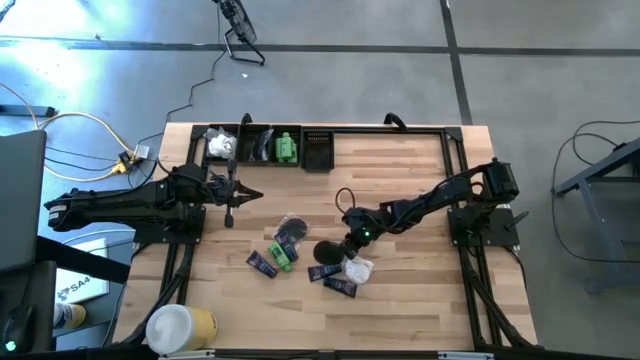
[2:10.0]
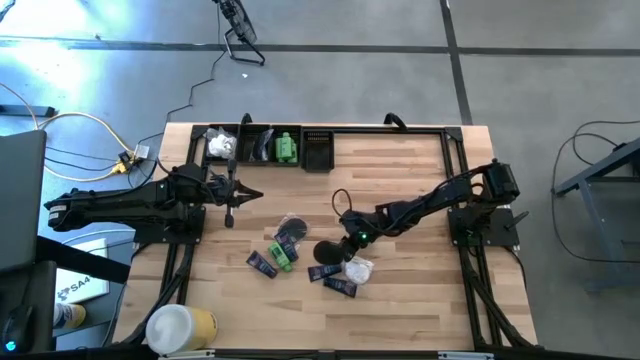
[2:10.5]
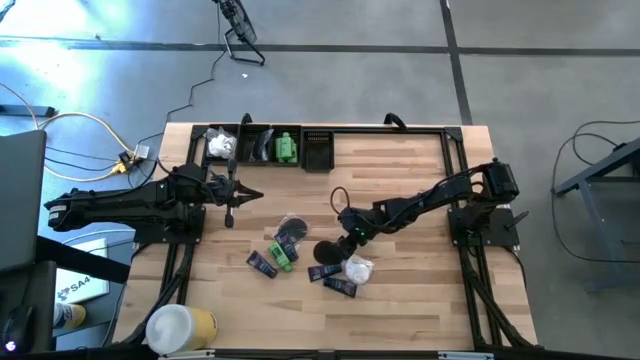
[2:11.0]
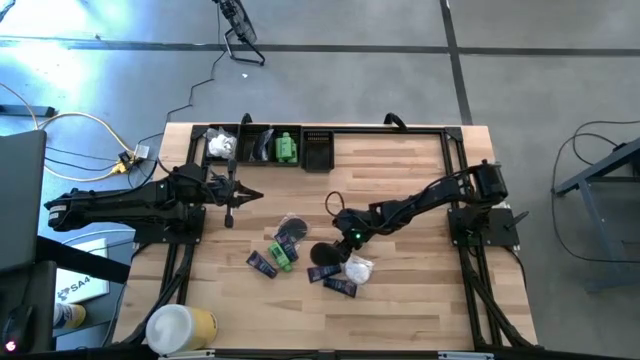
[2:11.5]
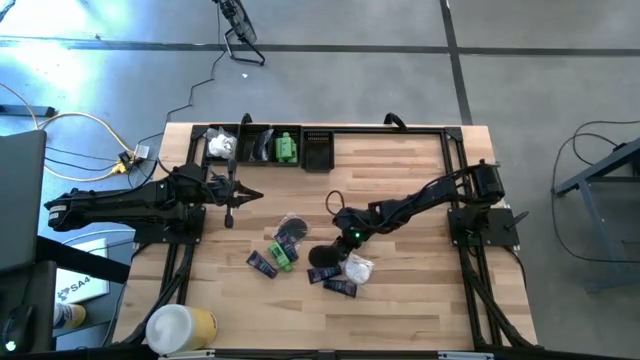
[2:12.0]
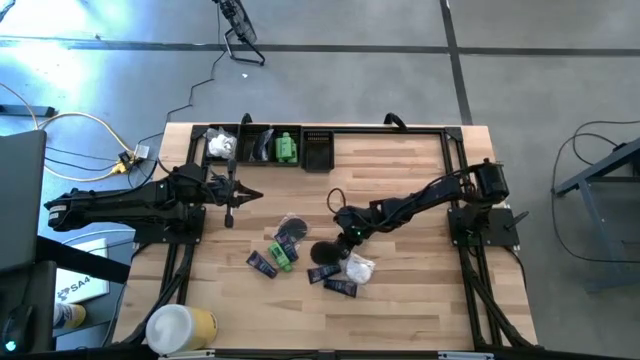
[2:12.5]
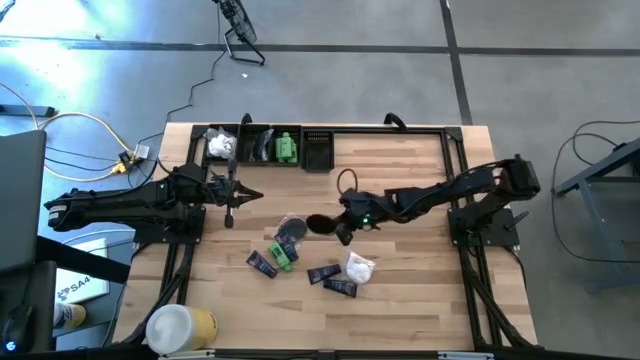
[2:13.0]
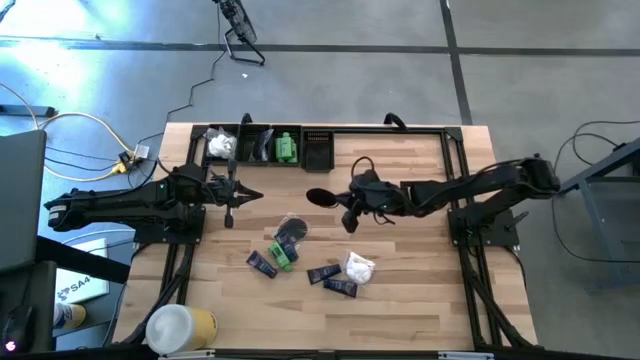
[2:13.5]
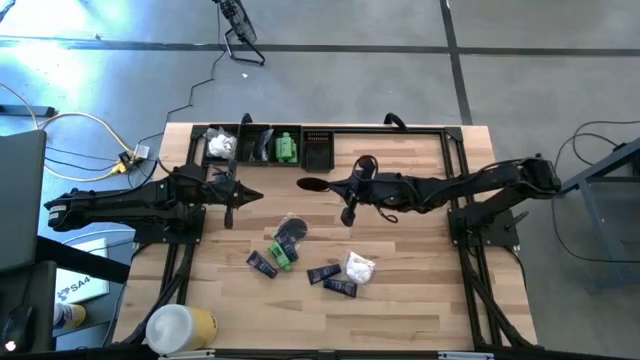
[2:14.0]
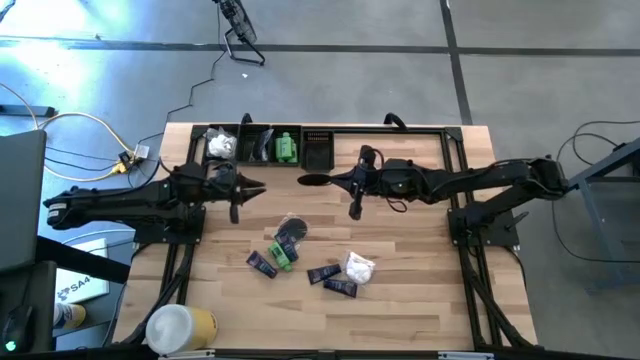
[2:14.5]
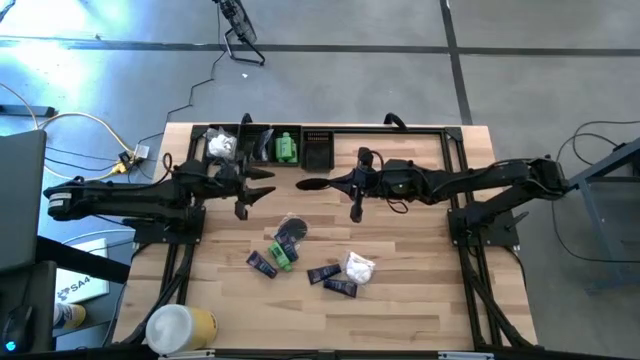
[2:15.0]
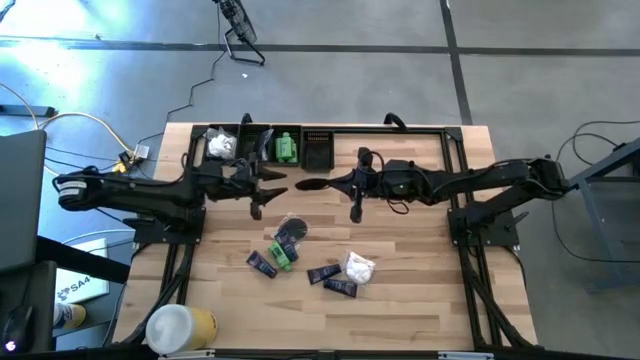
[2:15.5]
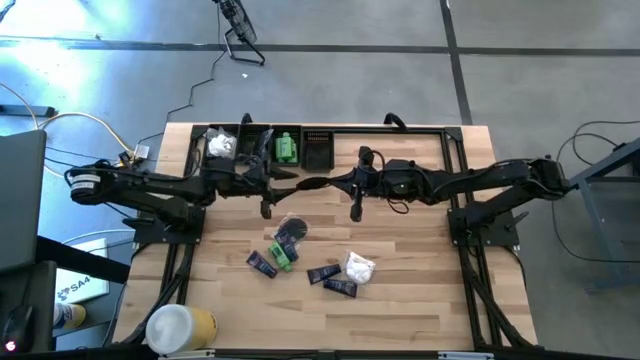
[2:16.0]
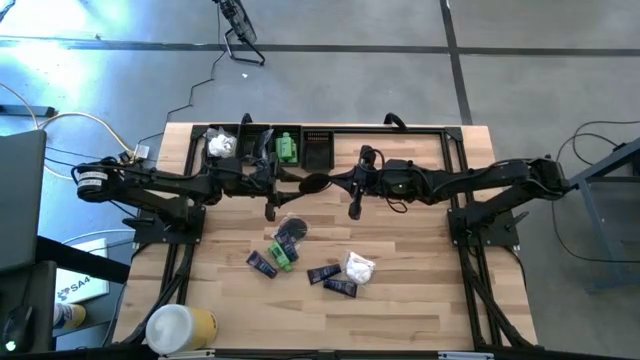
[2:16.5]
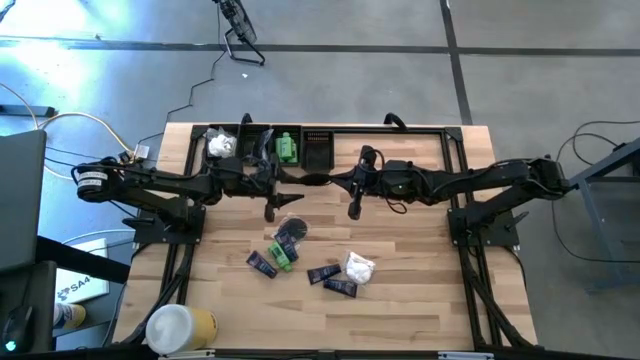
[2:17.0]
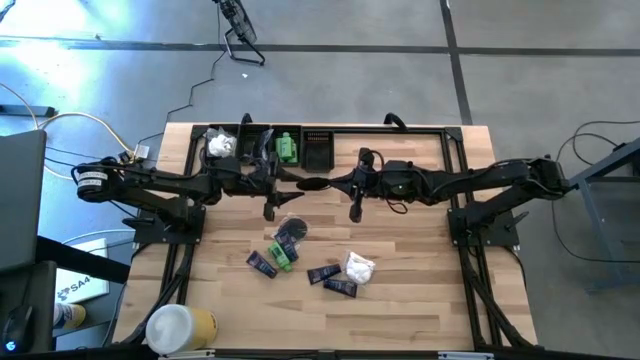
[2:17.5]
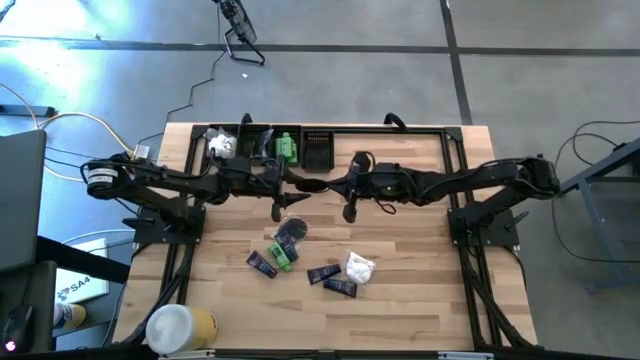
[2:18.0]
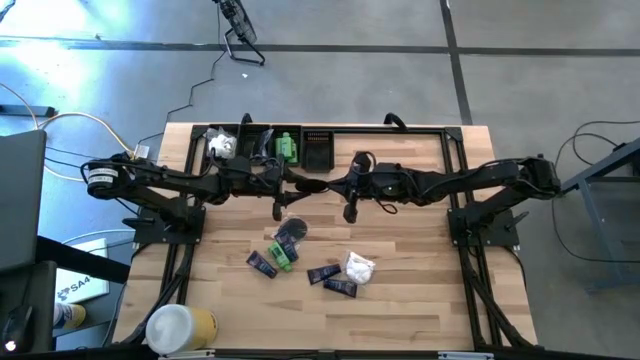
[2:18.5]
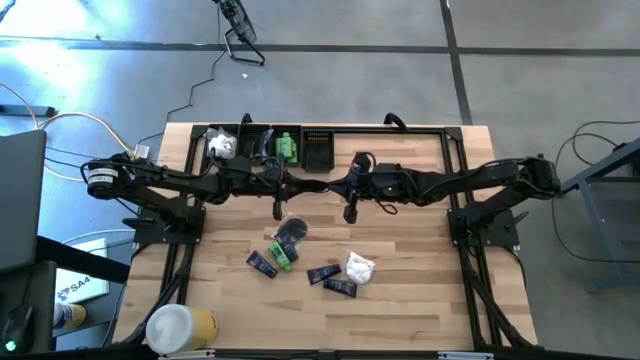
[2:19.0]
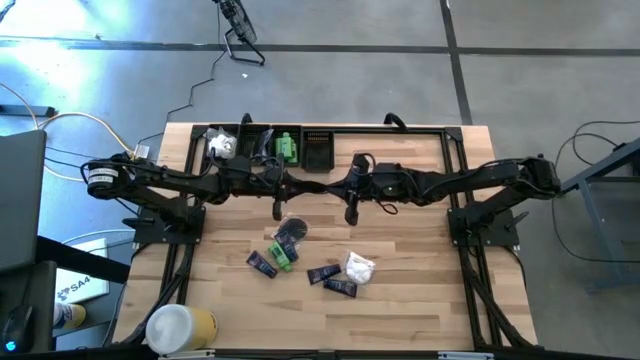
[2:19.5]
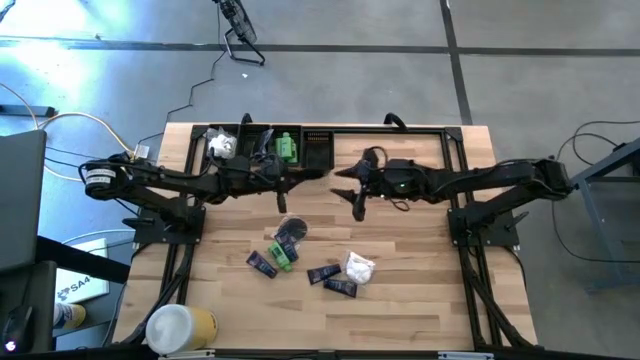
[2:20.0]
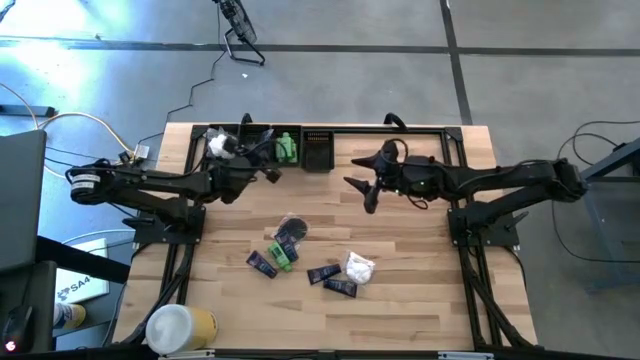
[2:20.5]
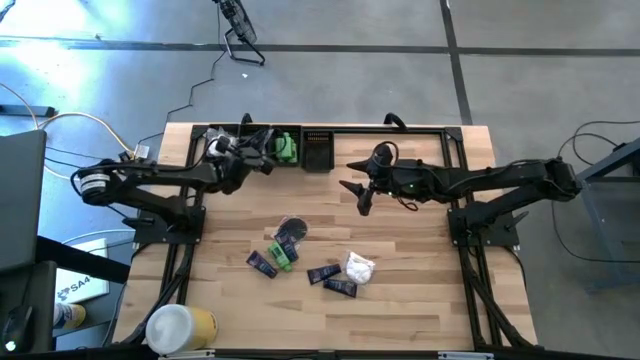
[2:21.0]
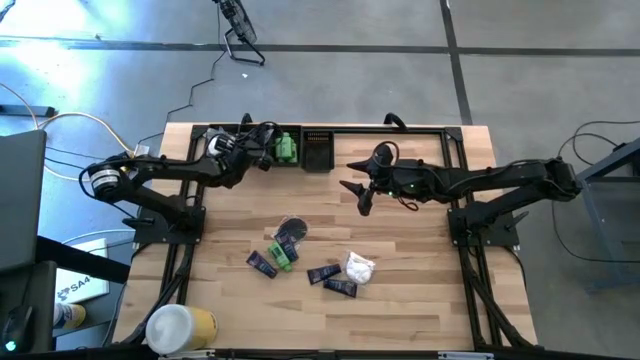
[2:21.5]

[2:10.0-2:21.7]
Task: Pick & Place Travel size toiletries
Put the hairbrush into the middle left black bin

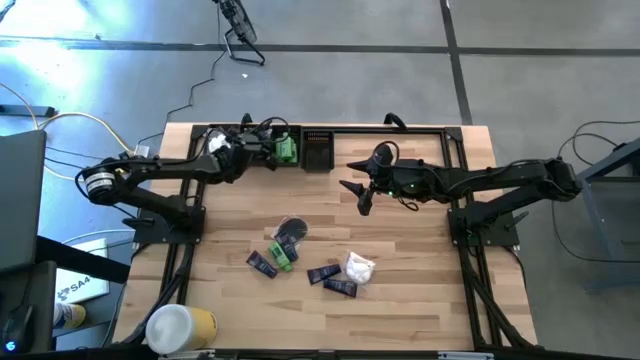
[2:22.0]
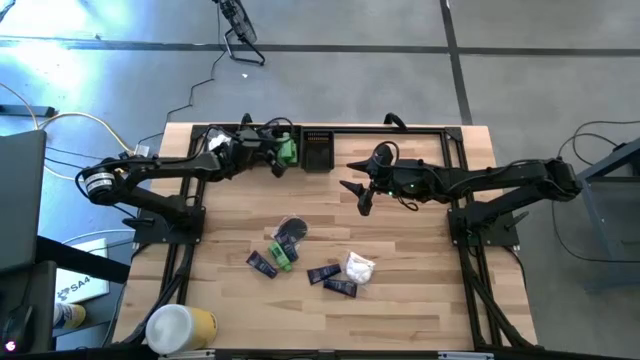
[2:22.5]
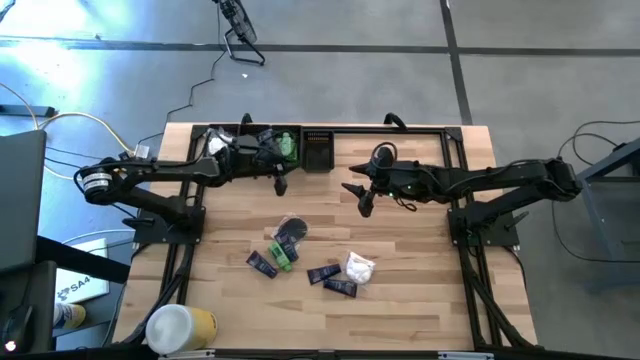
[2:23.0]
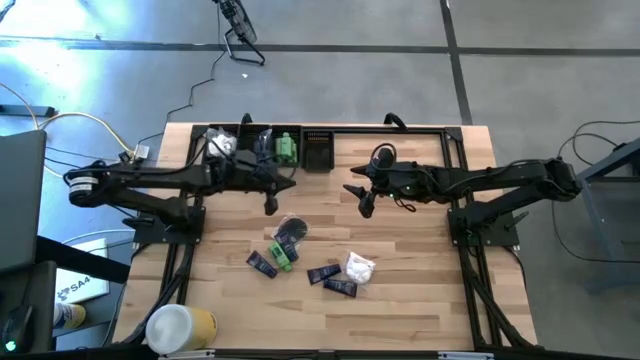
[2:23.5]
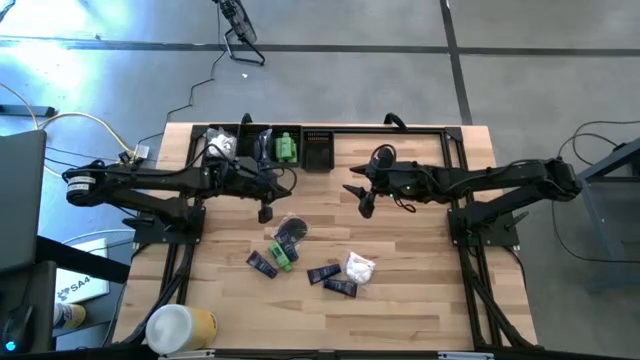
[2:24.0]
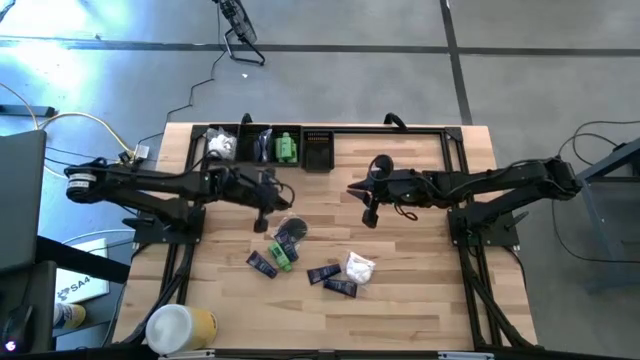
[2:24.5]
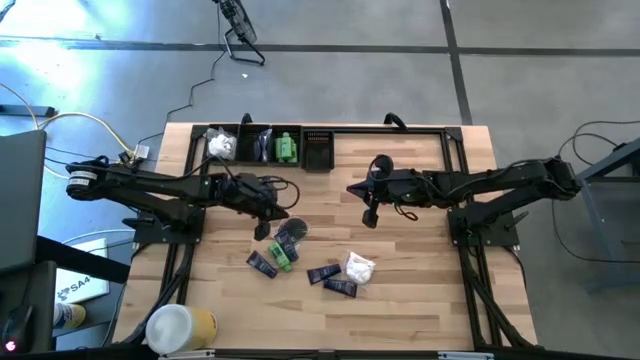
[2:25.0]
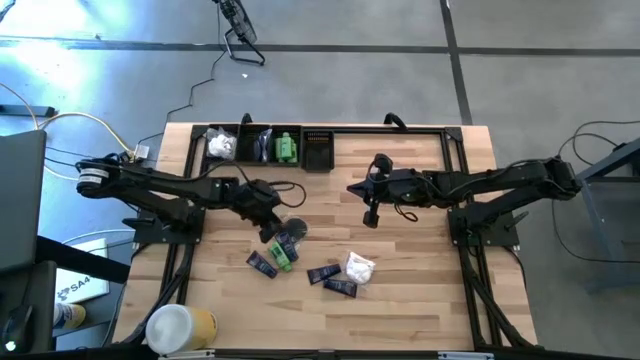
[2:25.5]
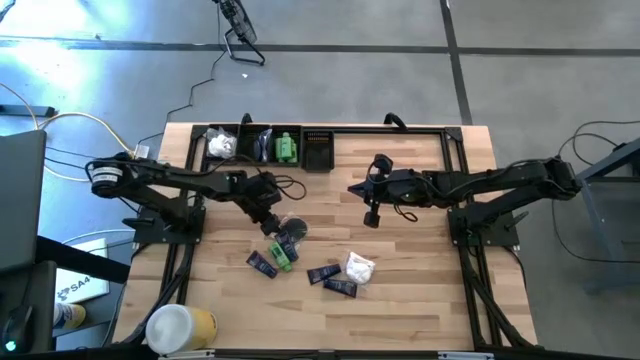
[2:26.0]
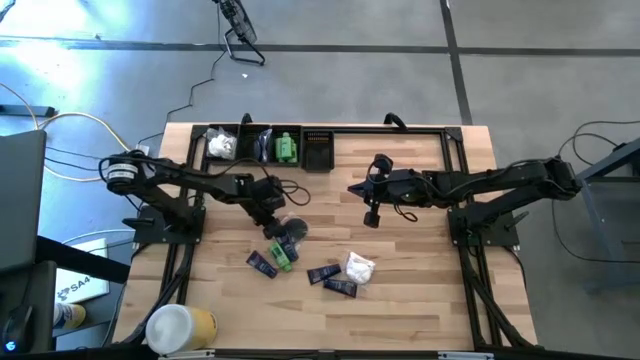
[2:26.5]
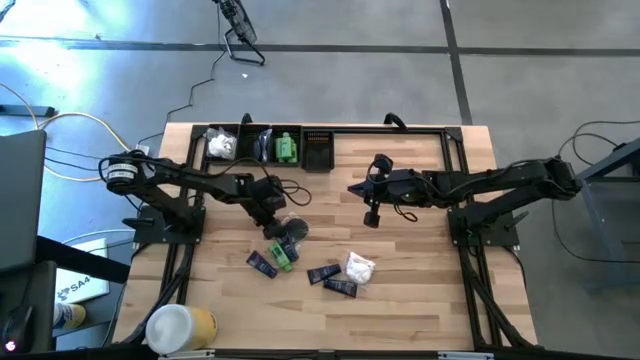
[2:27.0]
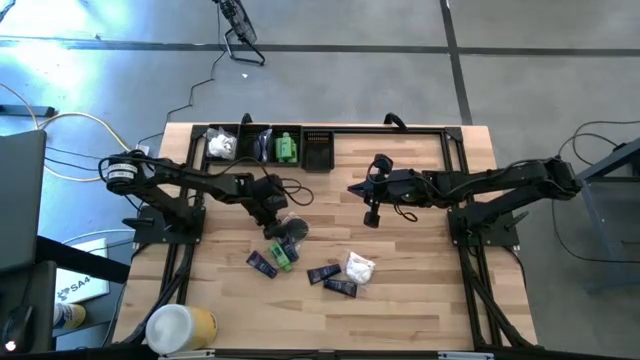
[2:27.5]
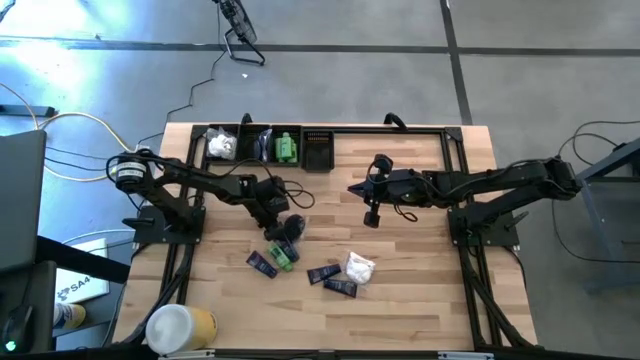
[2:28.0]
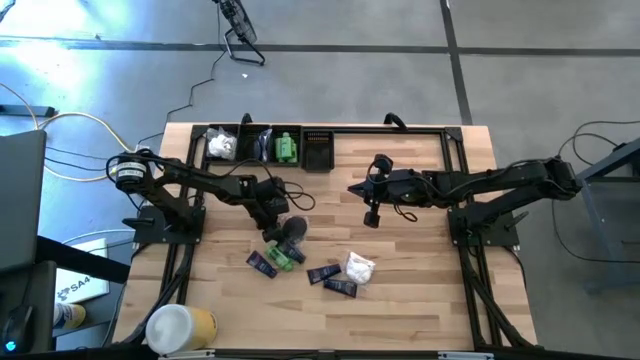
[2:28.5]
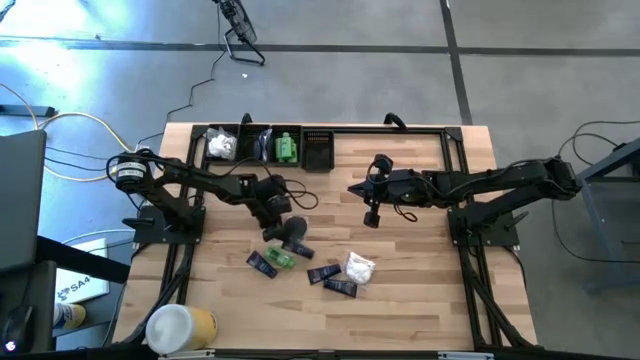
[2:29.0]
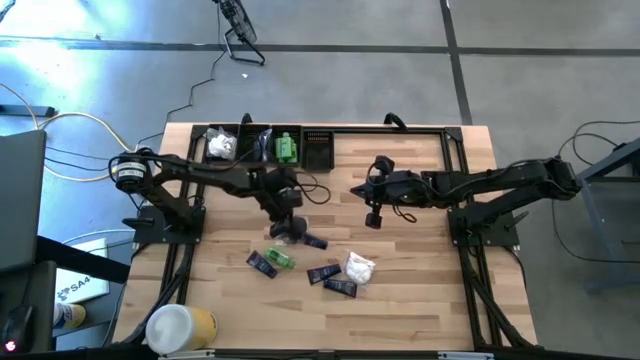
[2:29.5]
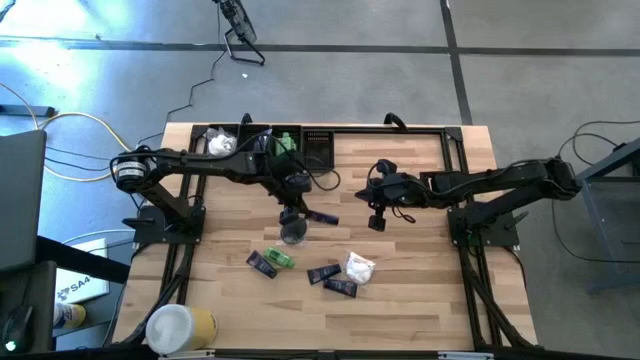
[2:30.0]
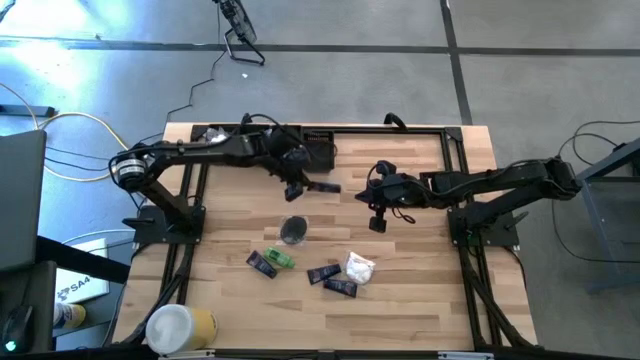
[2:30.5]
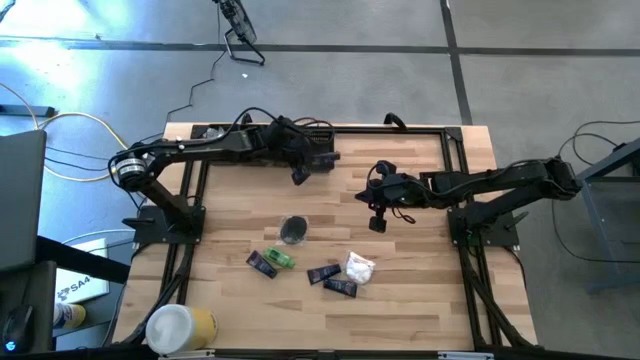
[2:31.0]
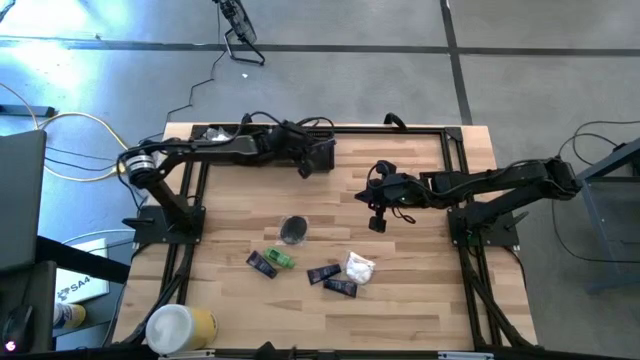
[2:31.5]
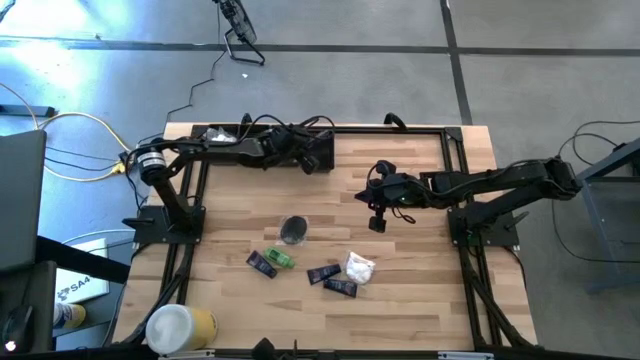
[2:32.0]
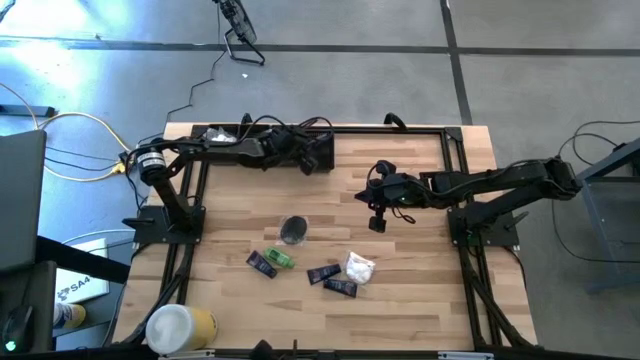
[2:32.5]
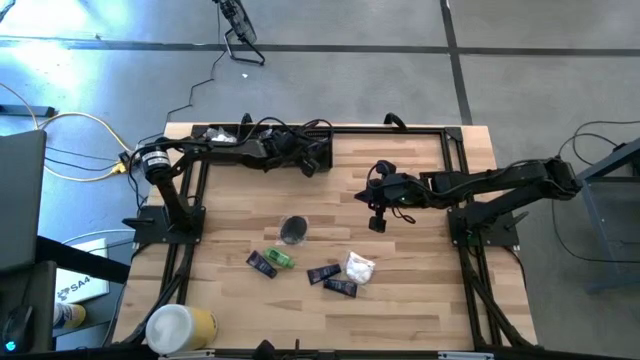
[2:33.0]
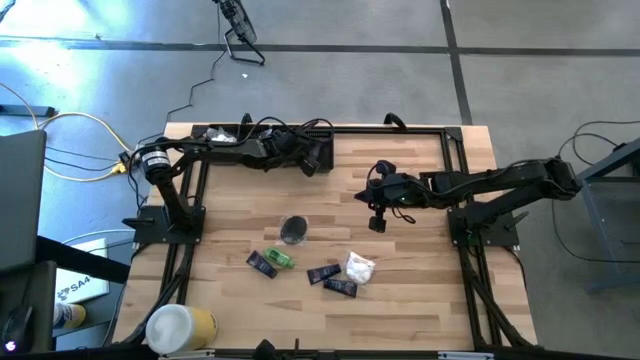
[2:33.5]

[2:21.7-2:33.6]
Put the shave cream into the right black bin
